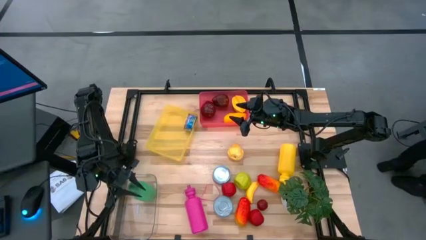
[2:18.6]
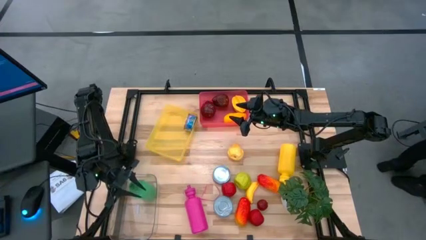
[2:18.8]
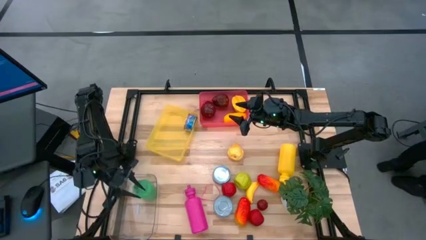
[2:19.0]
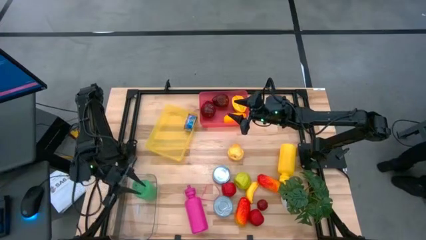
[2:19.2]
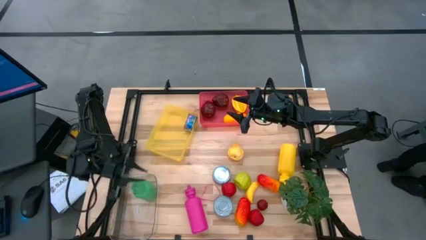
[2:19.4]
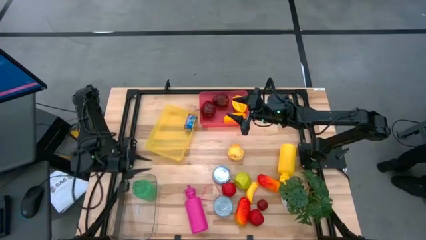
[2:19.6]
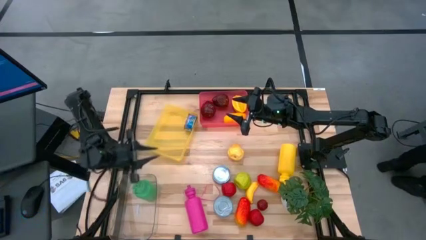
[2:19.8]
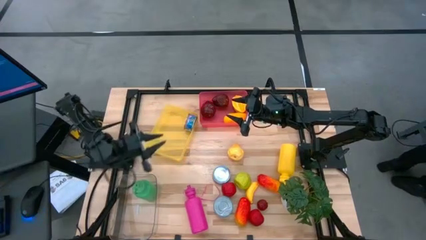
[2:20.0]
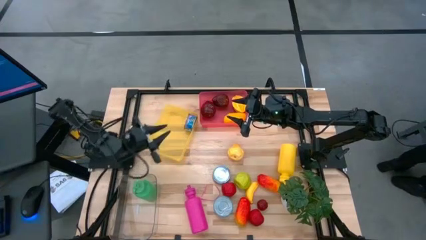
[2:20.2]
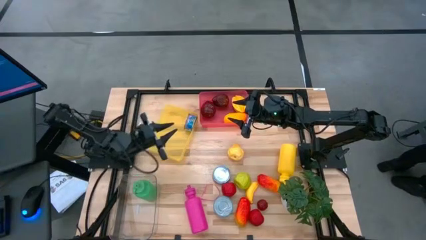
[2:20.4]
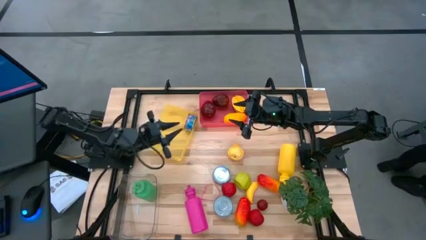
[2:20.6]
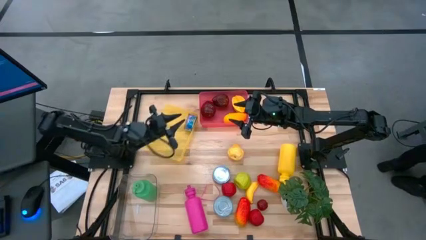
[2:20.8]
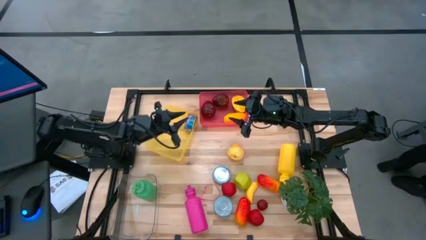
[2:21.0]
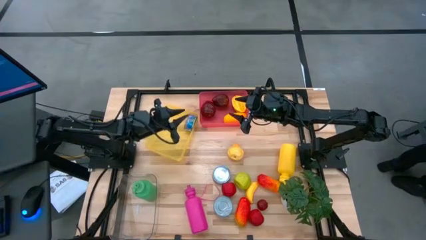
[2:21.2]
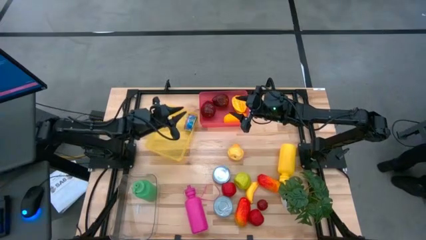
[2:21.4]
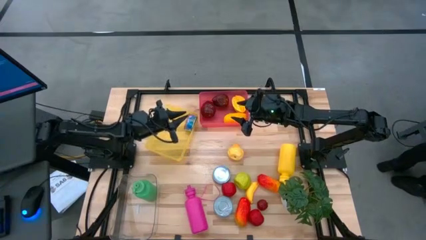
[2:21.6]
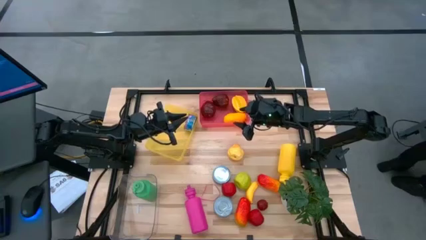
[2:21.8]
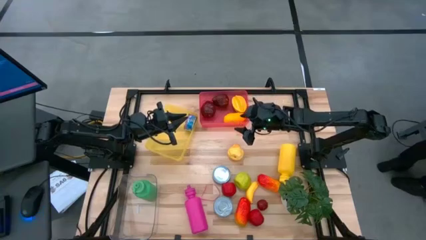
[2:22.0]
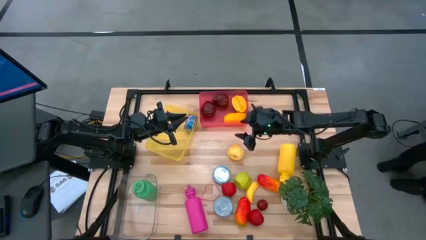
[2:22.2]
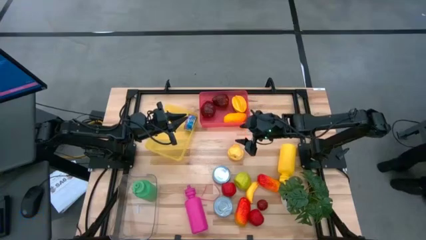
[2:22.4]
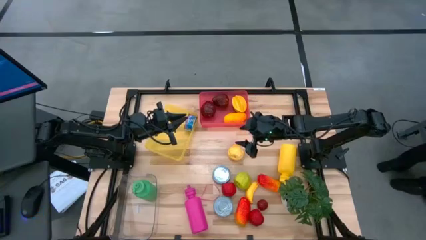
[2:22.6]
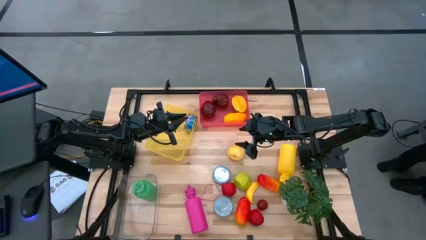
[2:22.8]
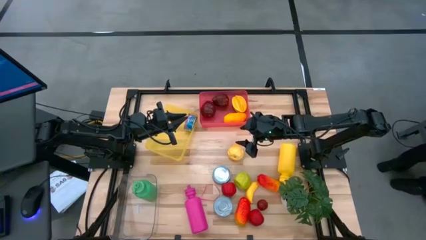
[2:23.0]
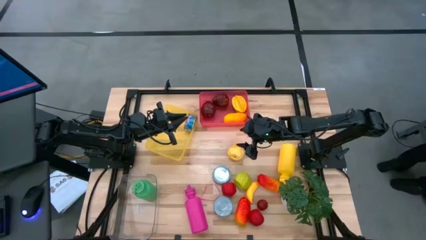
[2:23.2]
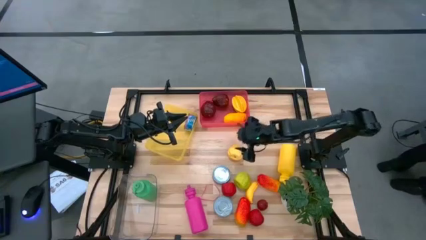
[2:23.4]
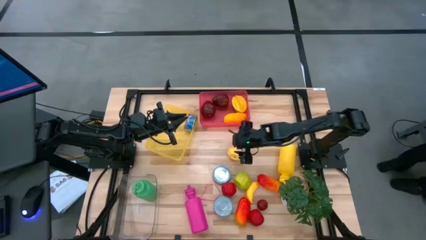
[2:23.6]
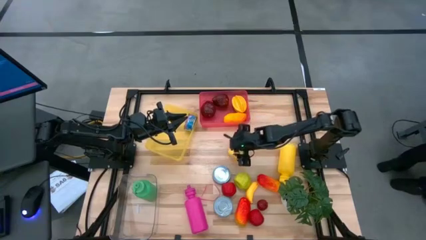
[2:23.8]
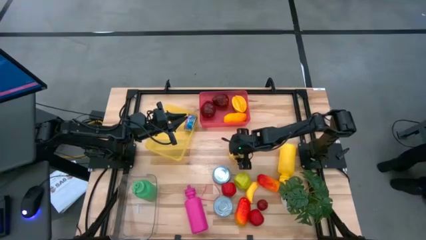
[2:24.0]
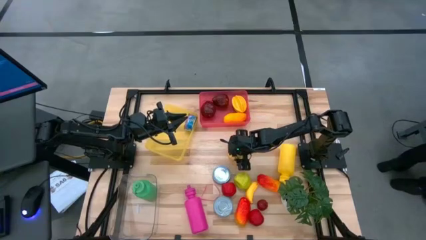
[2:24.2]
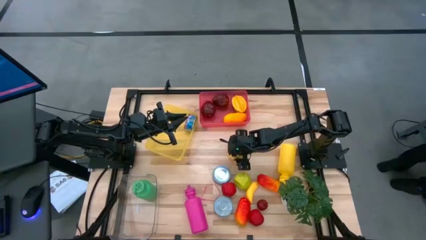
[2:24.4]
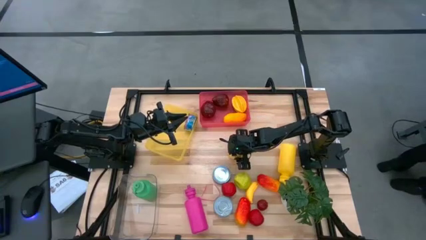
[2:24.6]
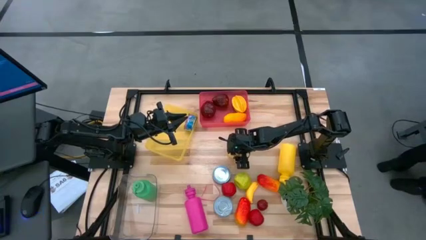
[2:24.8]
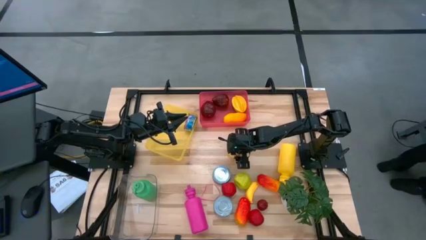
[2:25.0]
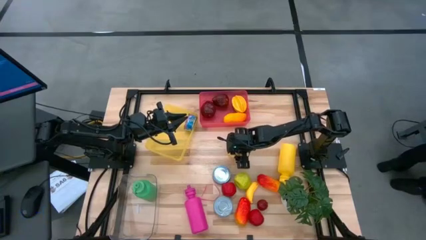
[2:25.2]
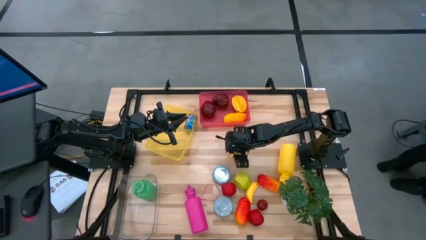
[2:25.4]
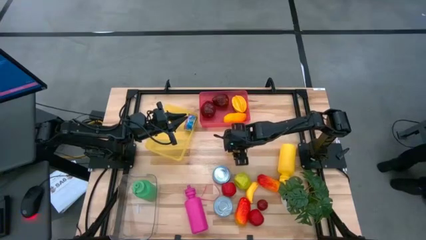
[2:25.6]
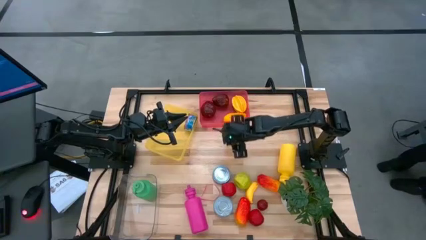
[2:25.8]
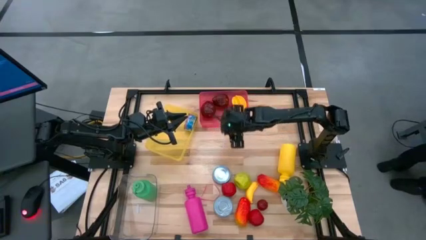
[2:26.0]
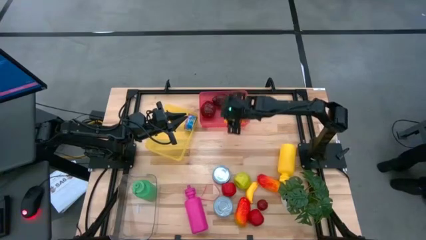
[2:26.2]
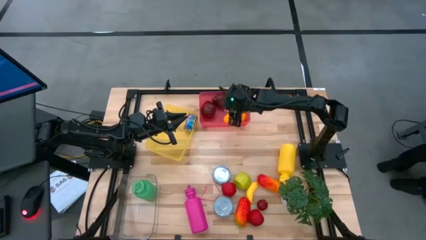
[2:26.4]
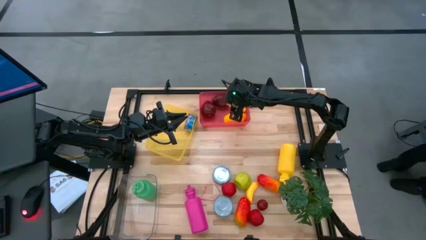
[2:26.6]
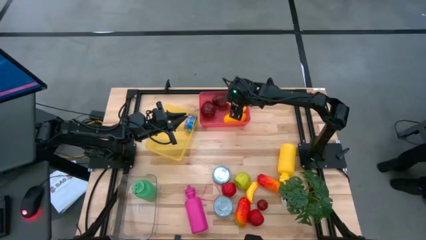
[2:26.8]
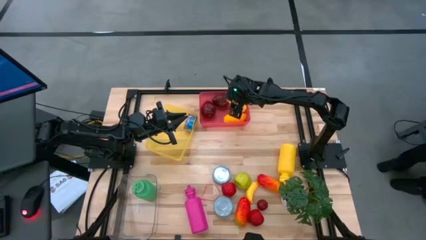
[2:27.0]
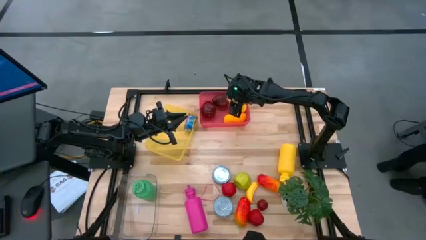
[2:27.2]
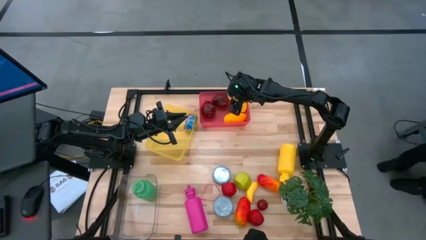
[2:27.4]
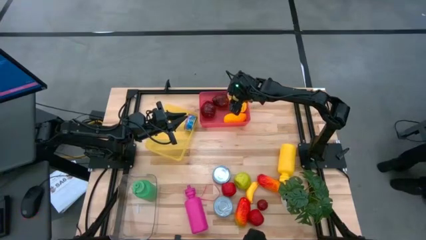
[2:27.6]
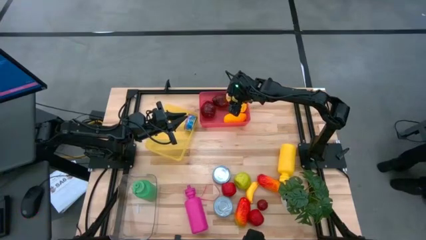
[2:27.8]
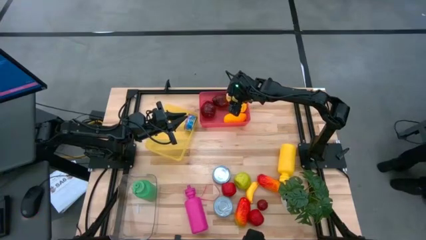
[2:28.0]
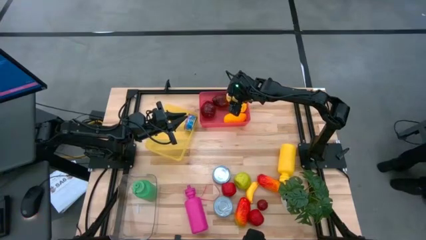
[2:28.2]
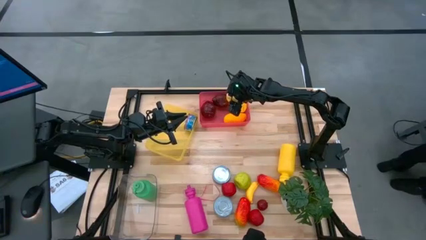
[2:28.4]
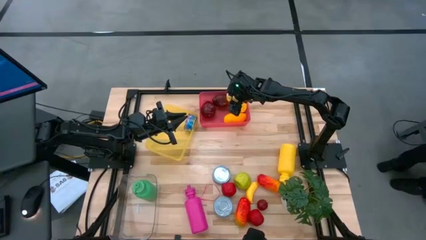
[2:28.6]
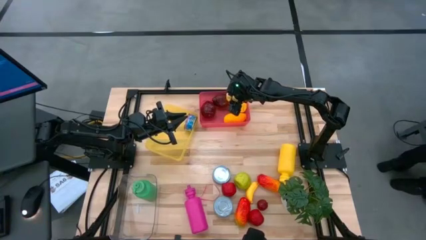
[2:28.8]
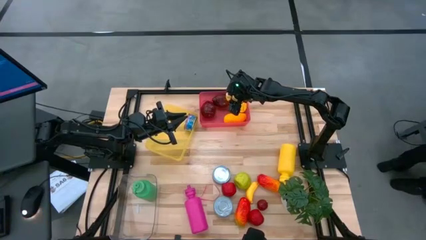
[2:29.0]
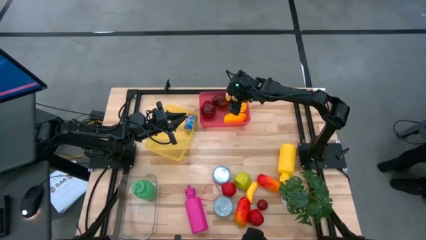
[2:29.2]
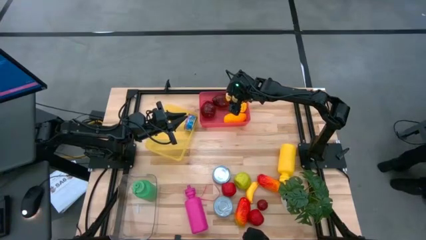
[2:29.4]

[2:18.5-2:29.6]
Task: Pick & Place Food Item
Put the pear into the pink bin
